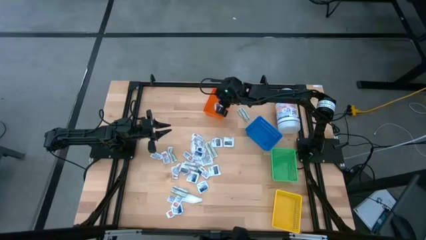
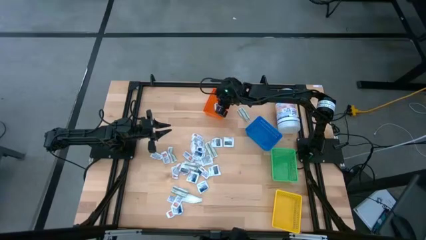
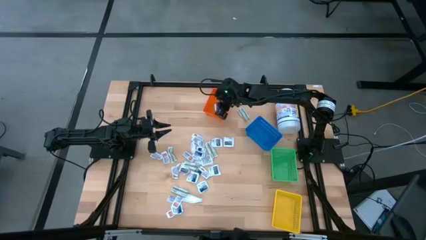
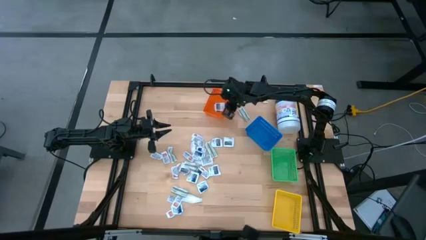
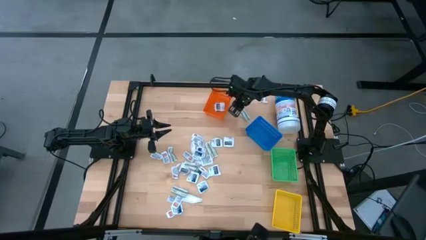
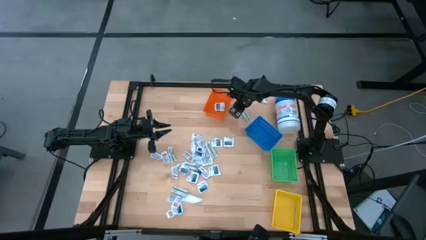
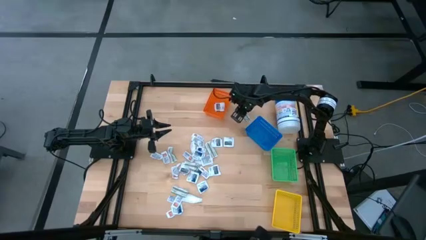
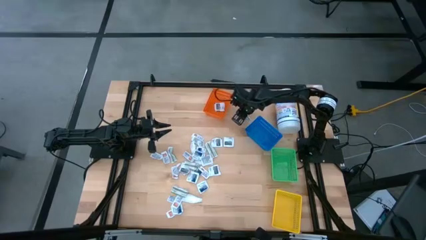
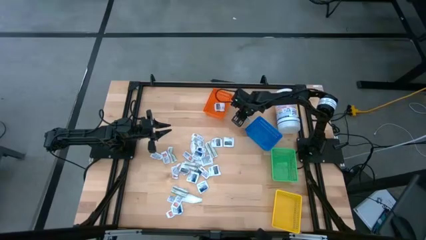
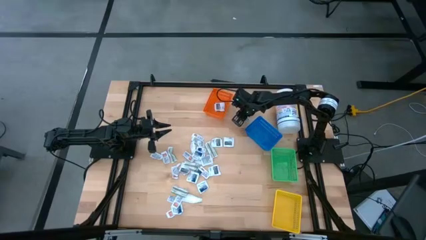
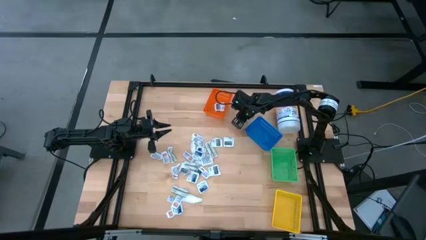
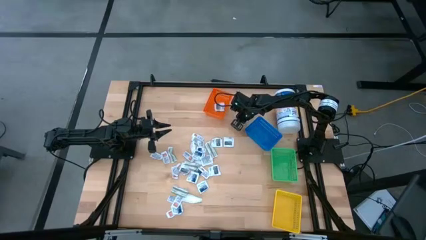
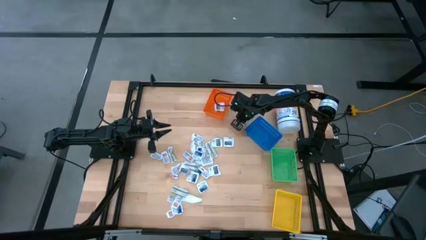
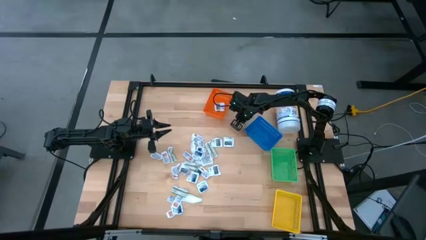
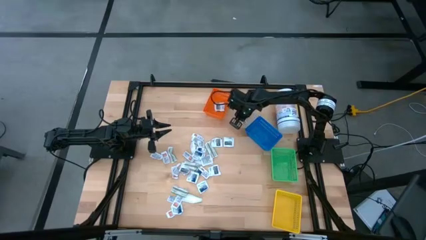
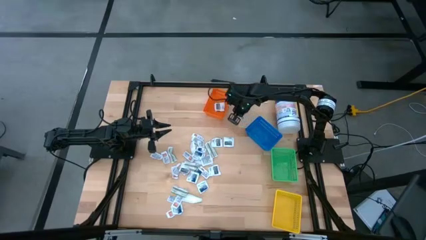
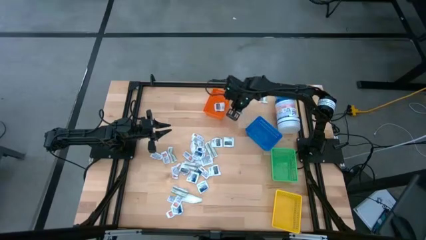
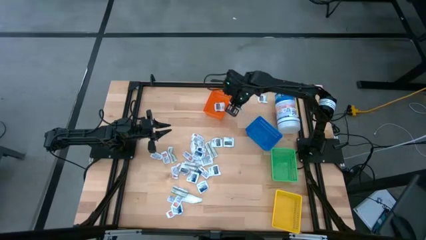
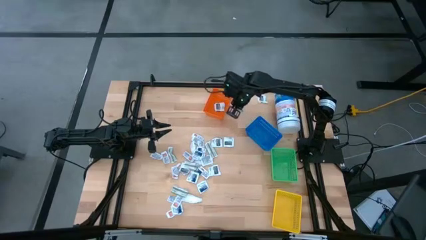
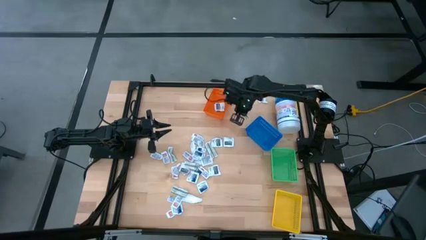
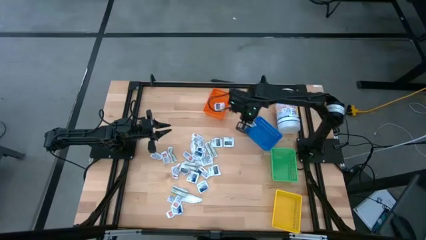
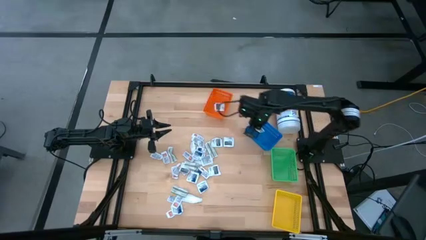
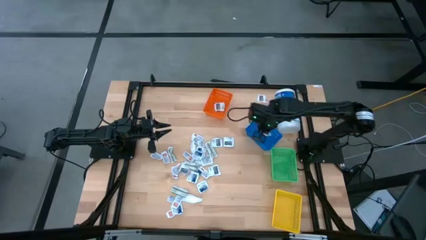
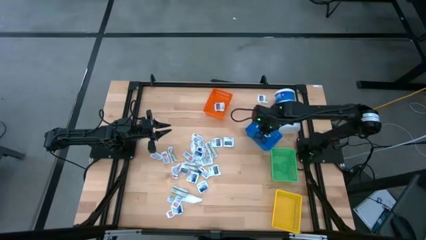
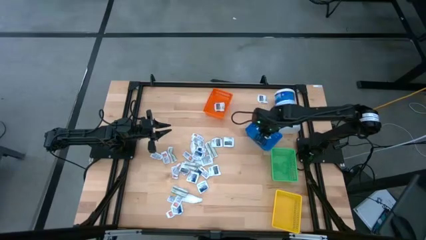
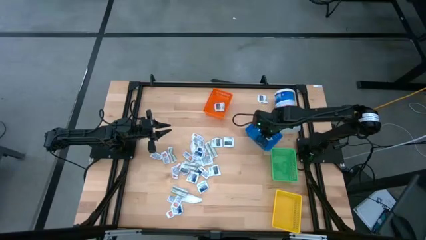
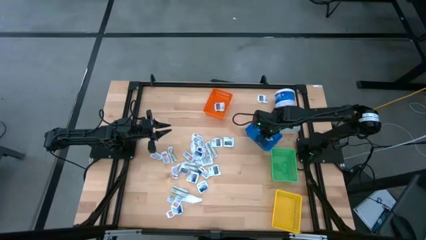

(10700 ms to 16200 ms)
Task: Pick & Place First Aid Supplies
Put the green bandage pack into the blue basket

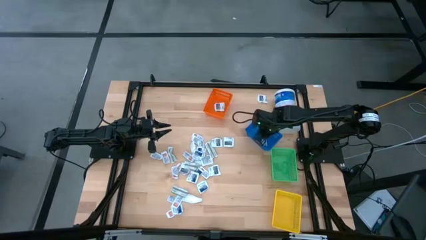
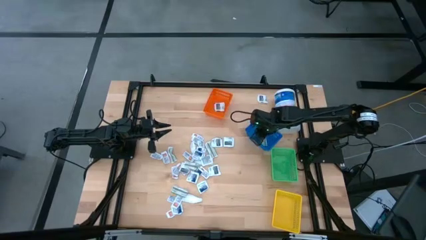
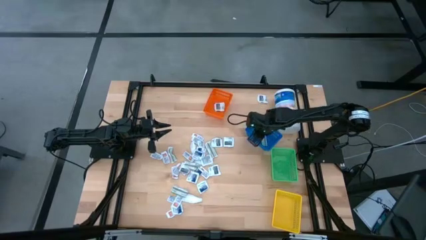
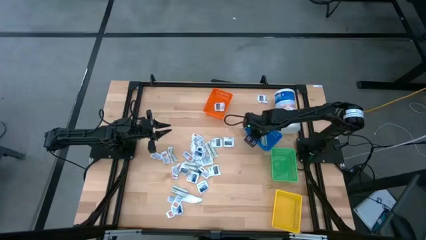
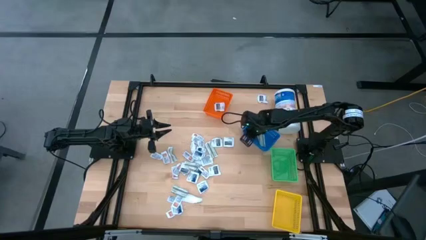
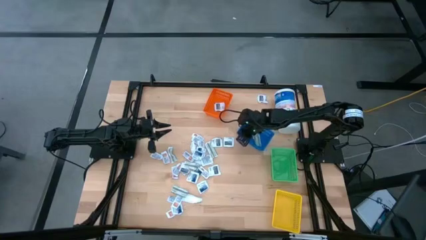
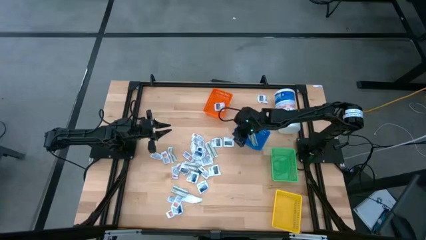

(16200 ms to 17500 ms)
Adjust the blue basket on the table

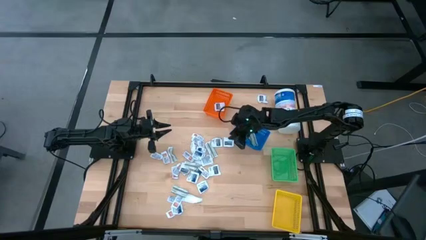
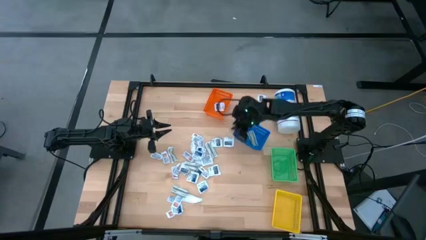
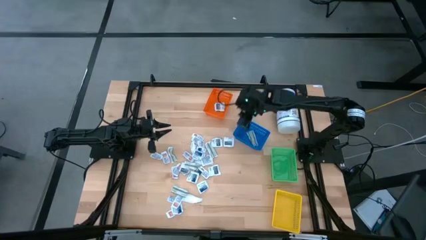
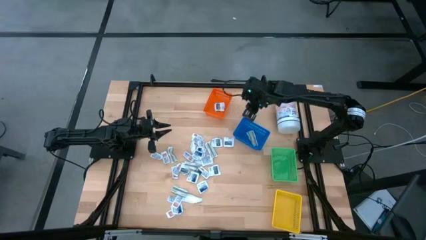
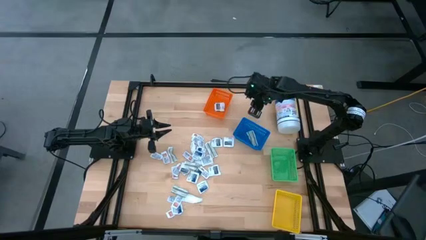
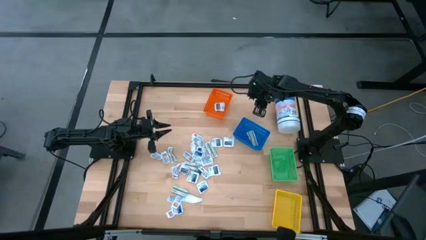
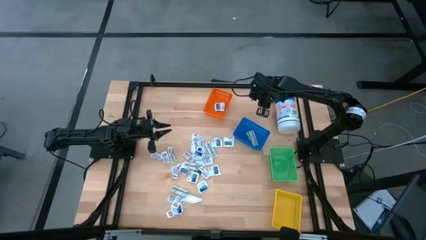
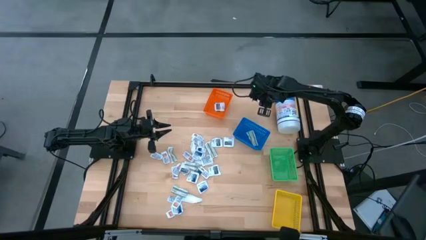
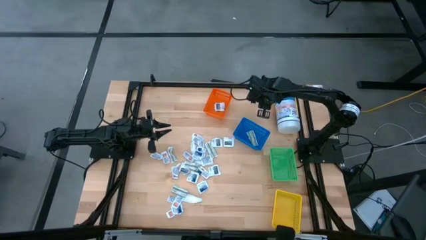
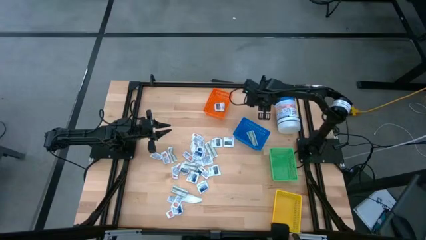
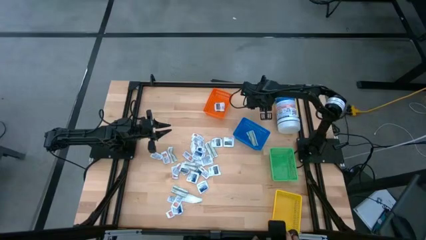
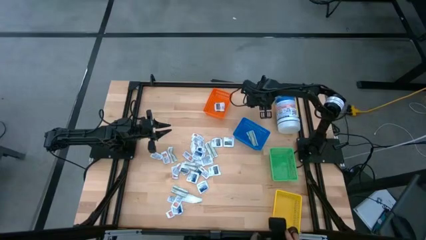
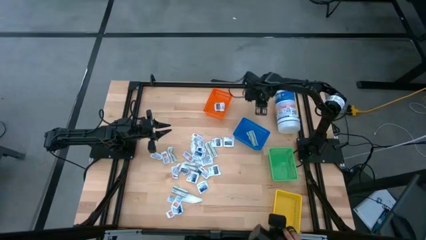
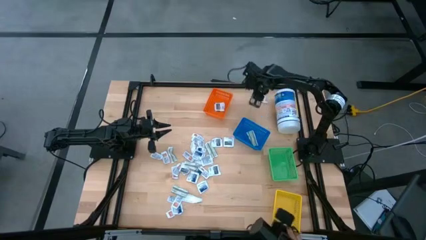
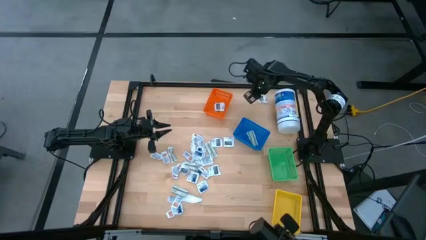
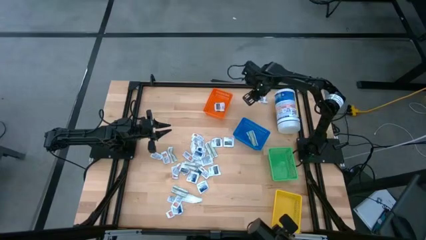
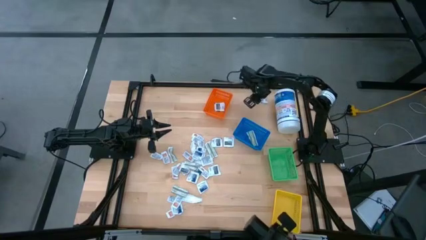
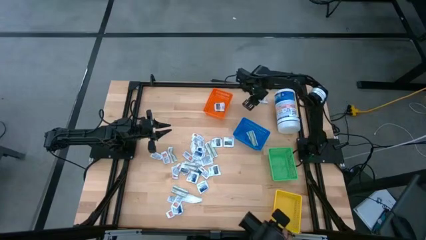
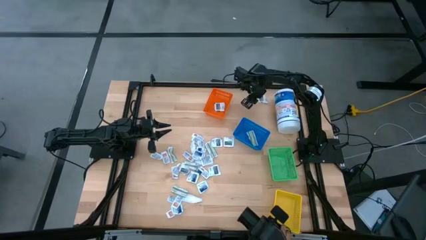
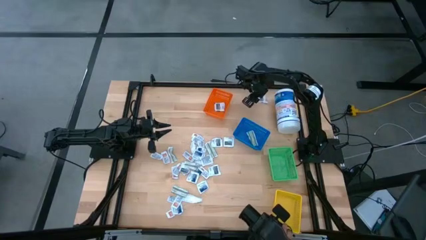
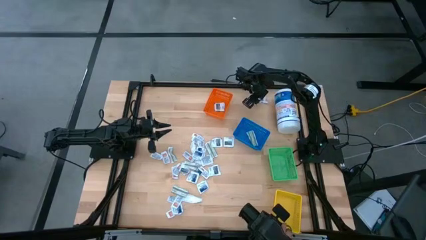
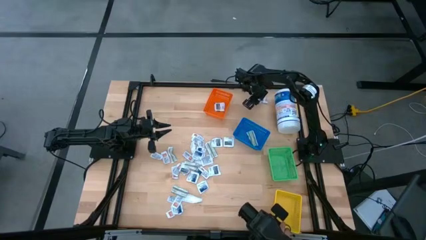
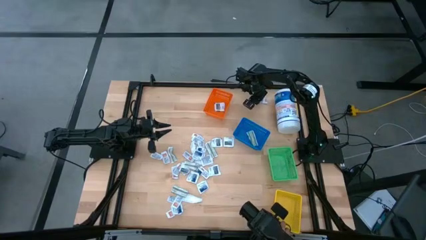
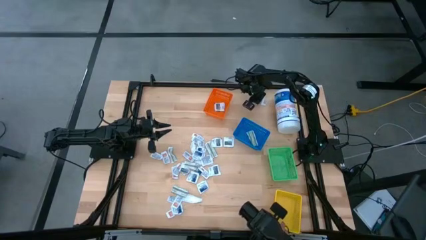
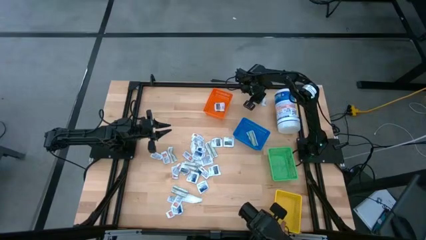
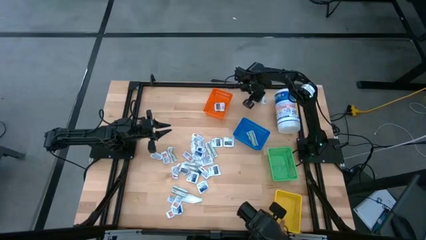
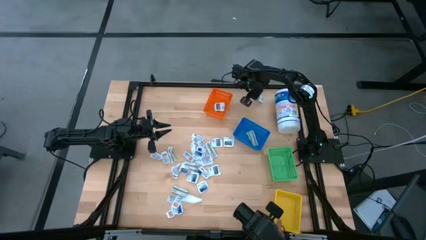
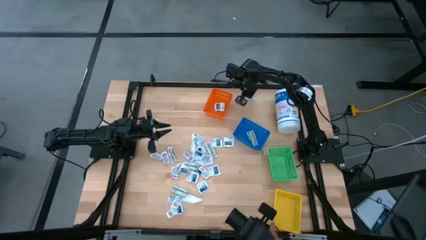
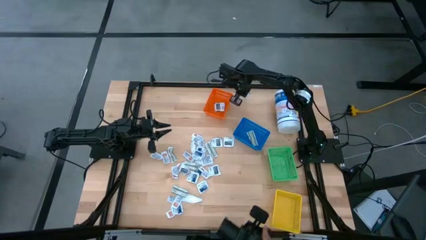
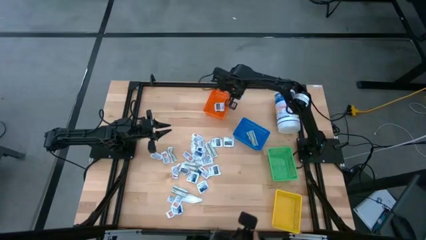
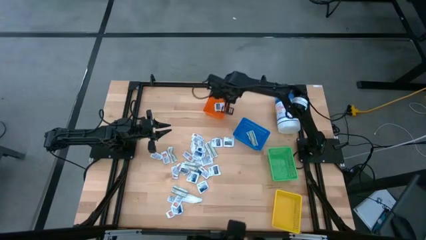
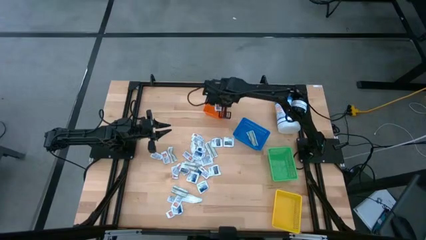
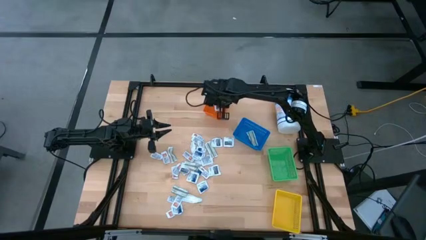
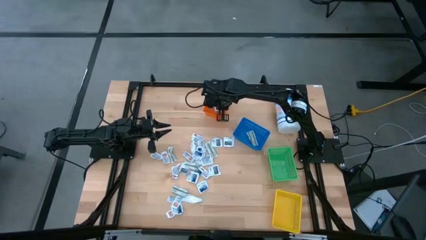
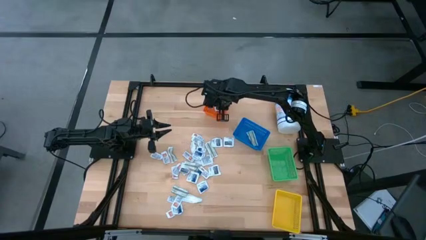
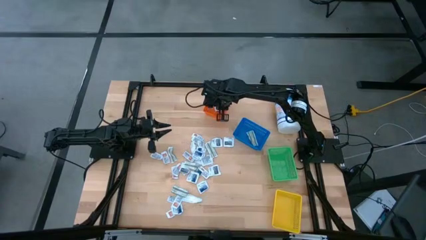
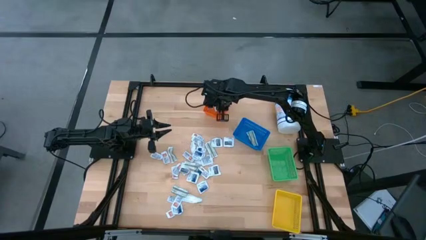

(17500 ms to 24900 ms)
Put the gray towelette pack into the orange basket

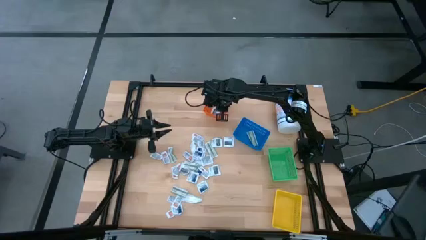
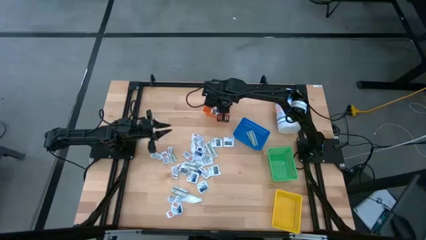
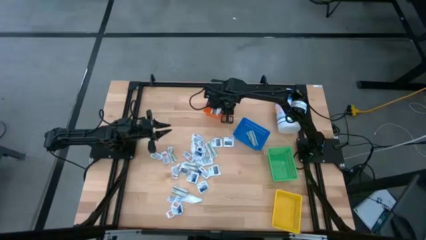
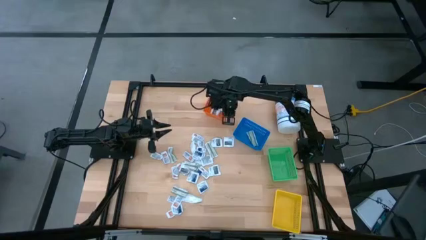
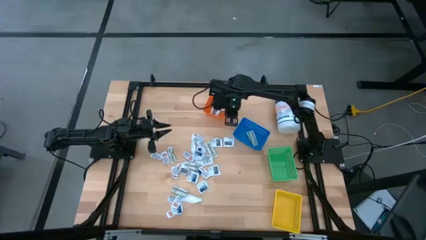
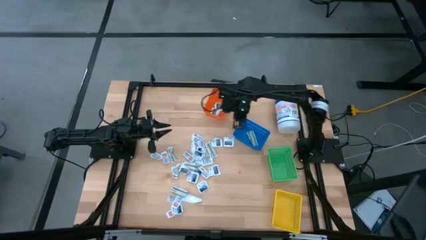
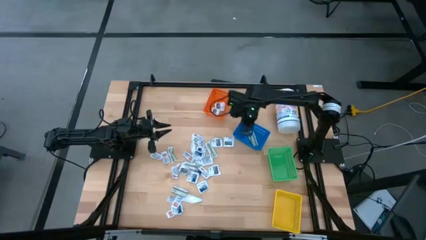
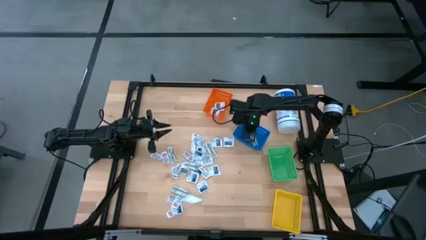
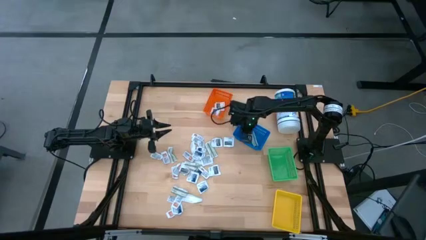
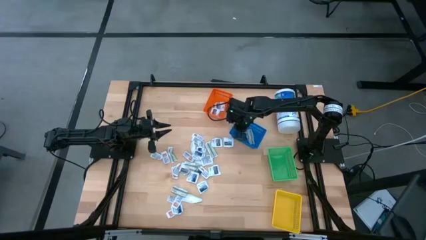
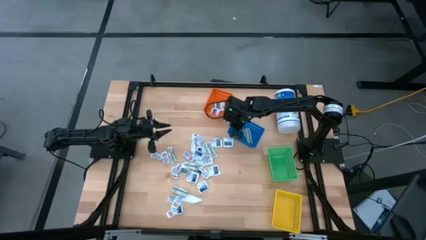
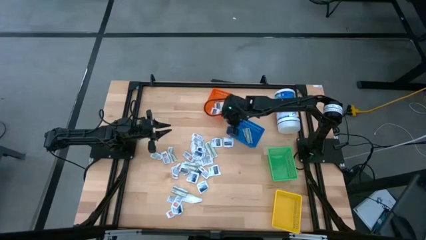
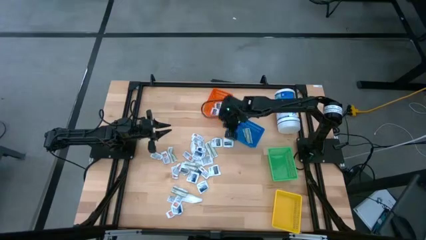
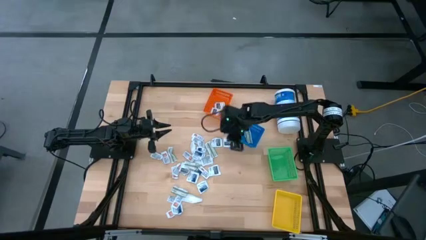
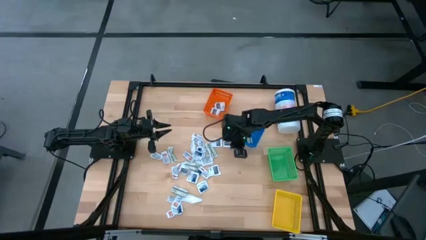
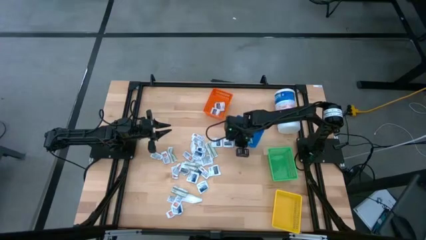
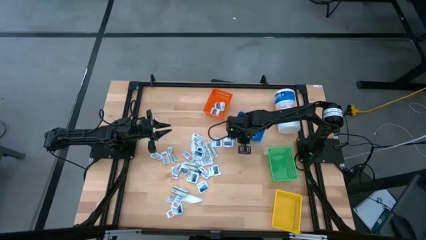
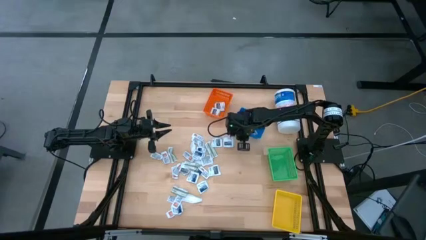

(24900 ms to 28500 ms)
Adjust the blue basket on the table
